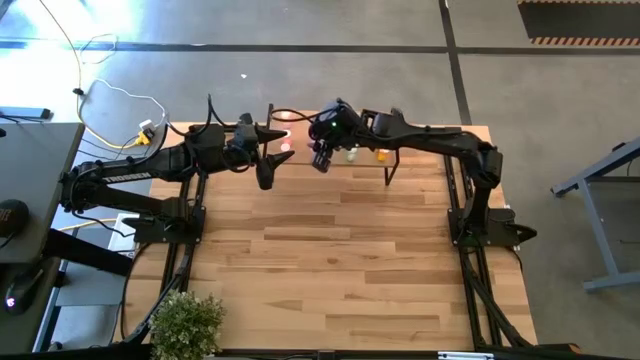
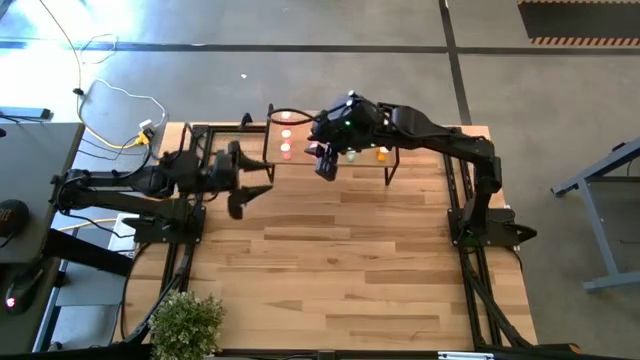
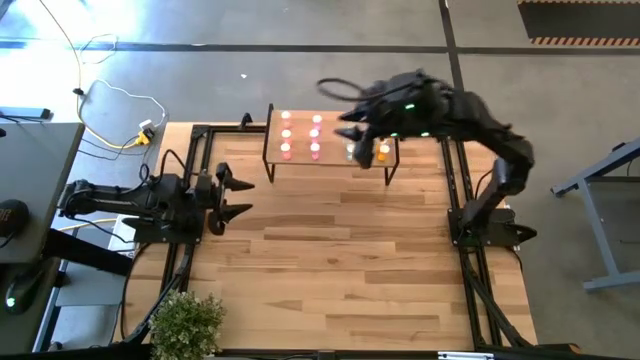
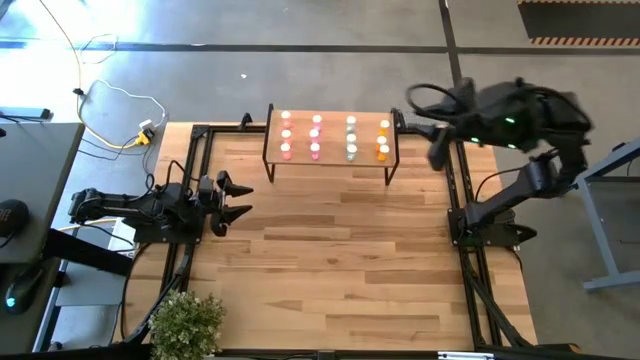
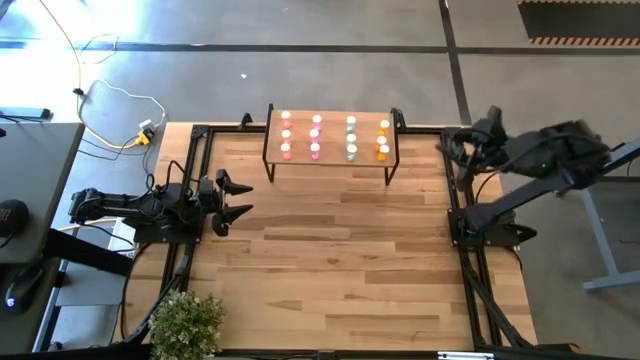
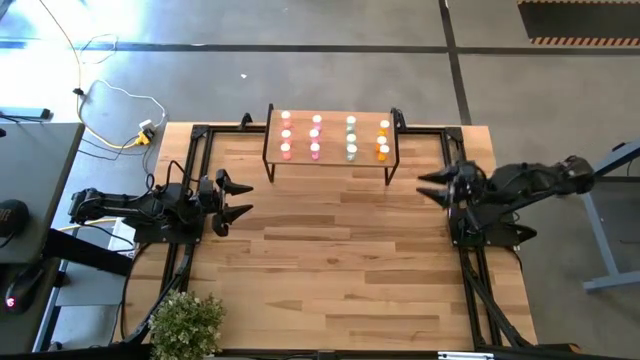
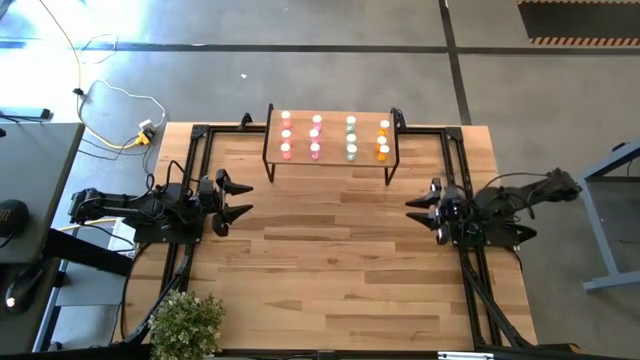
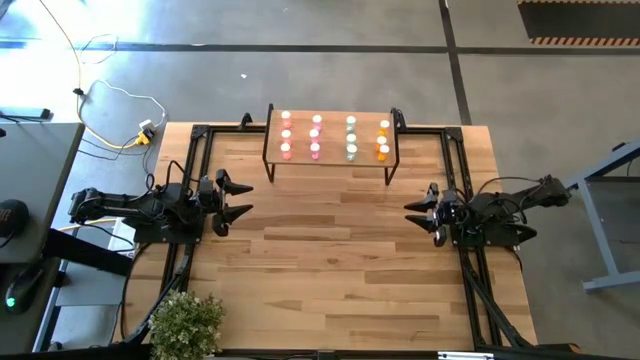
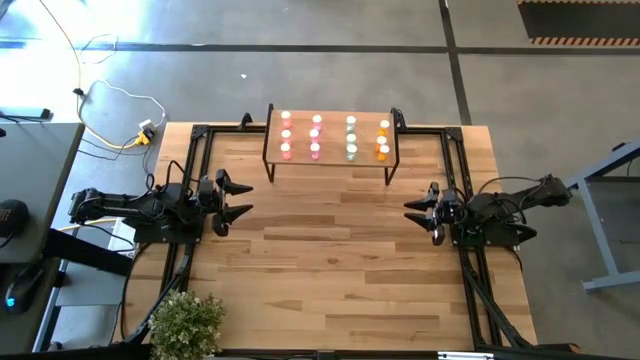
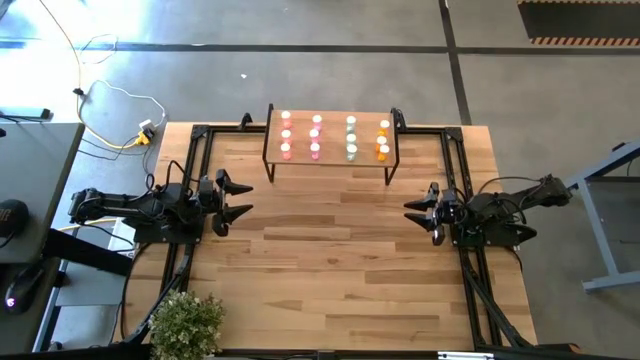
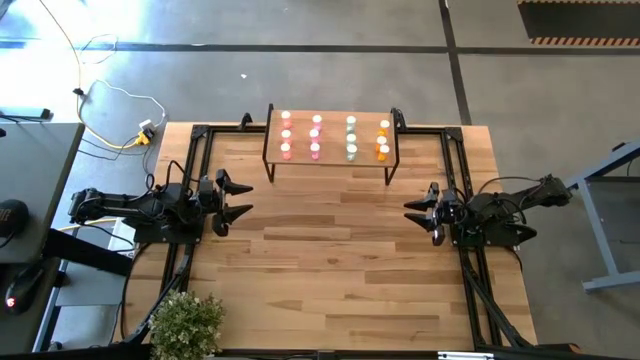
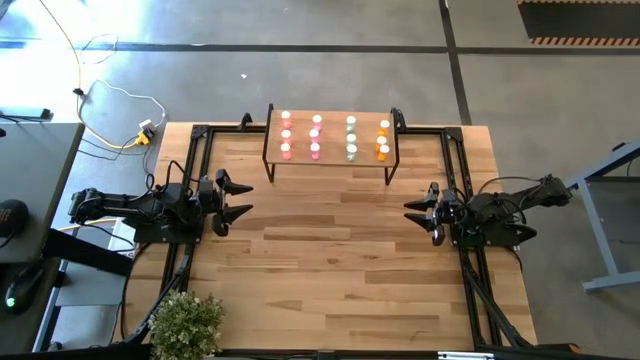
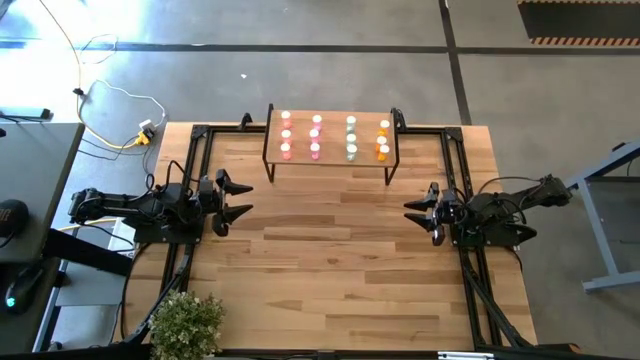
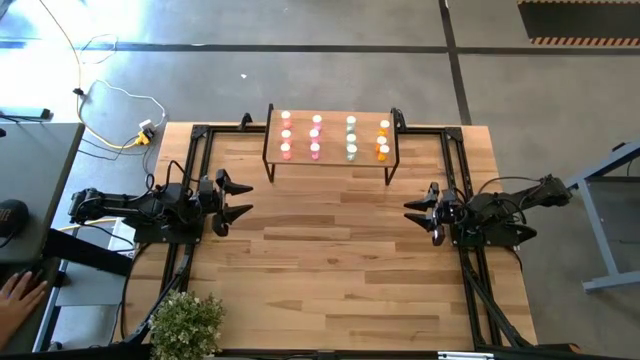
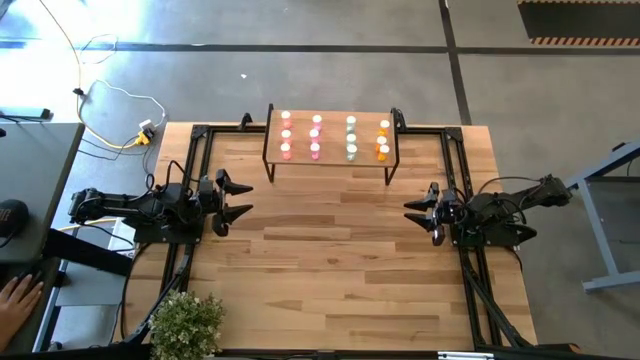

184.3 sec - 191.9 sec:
Task: Pick and place medicine bottles onto shelf by color
Return to Home Position

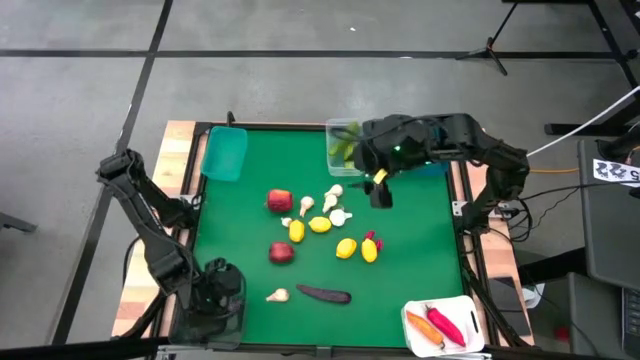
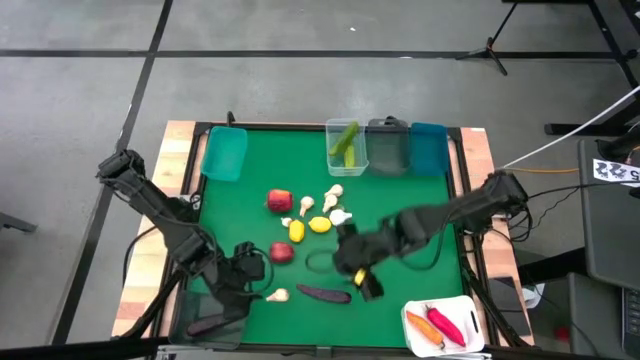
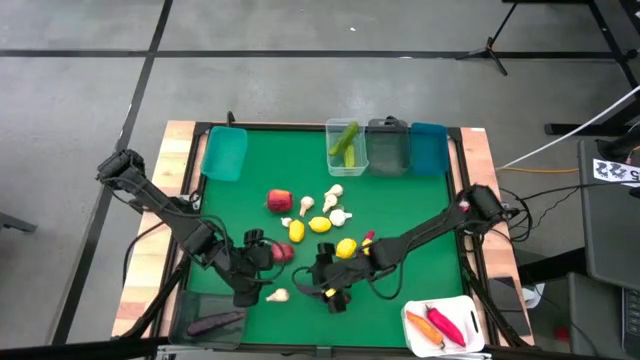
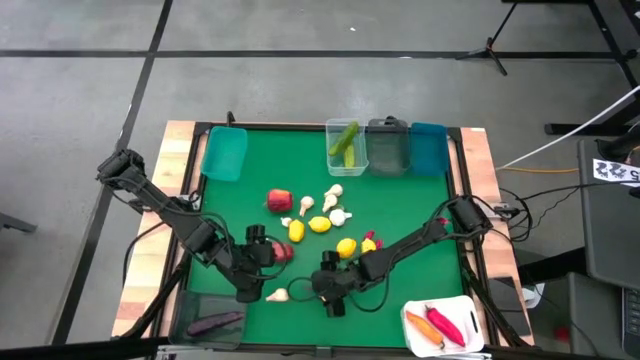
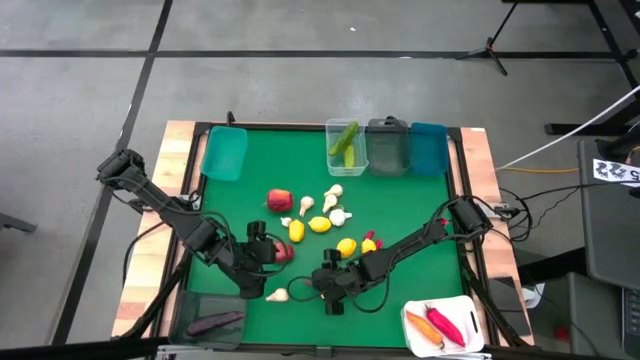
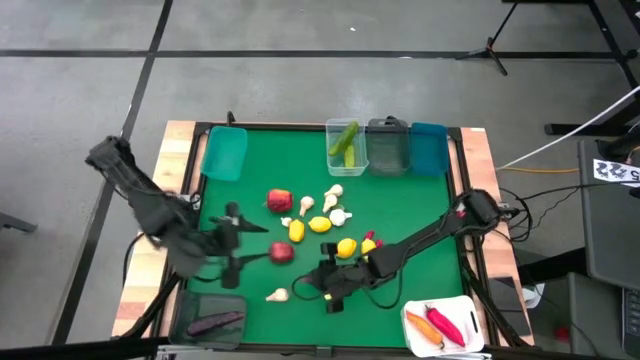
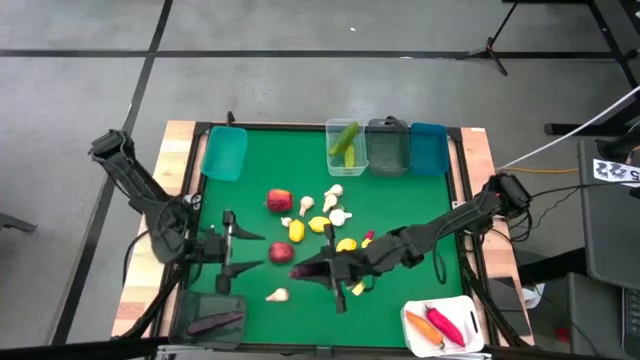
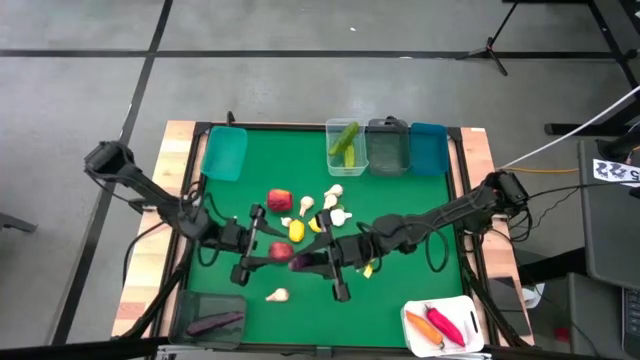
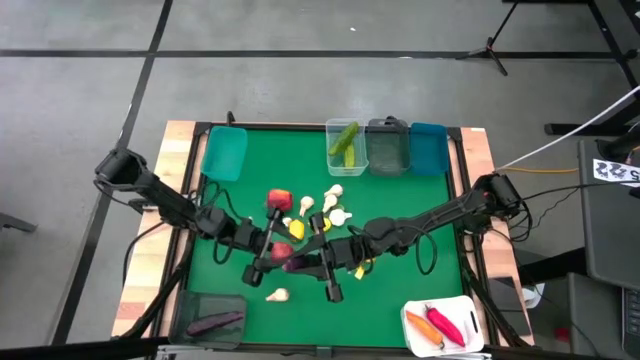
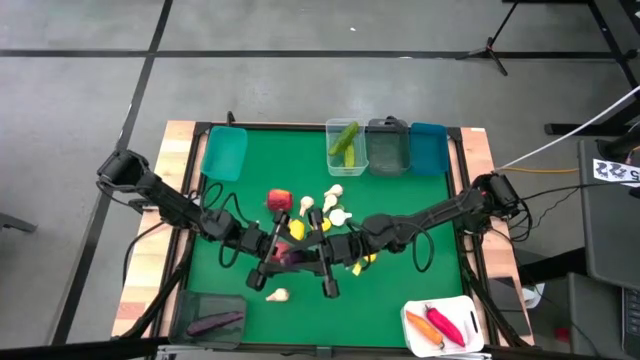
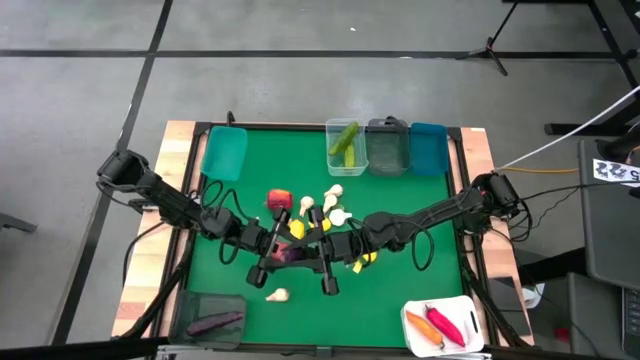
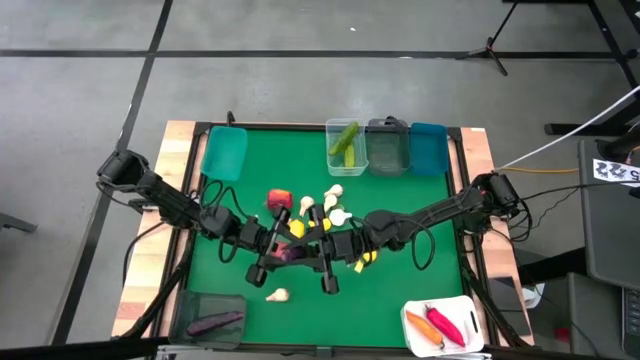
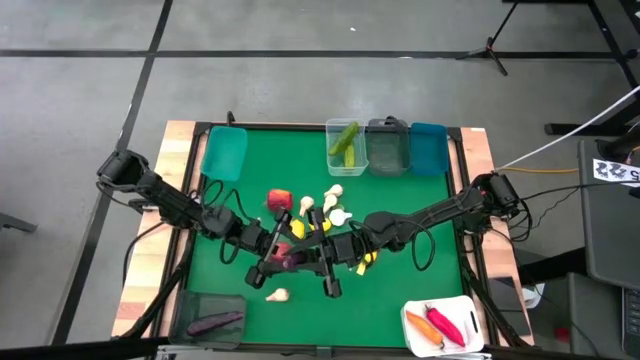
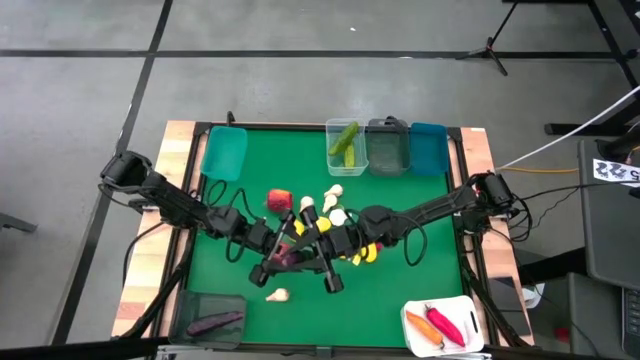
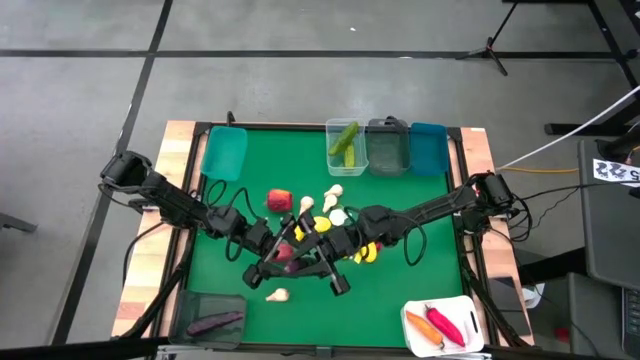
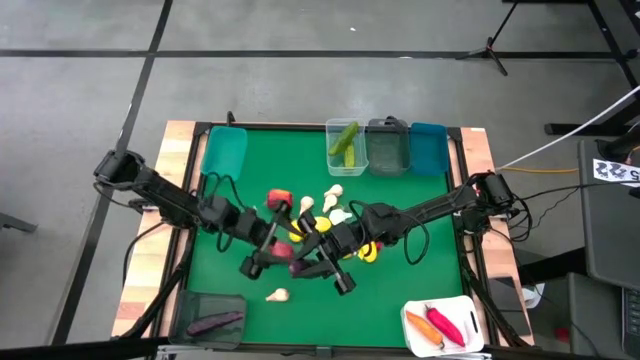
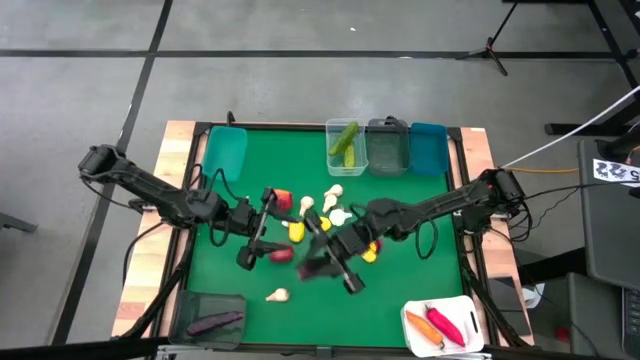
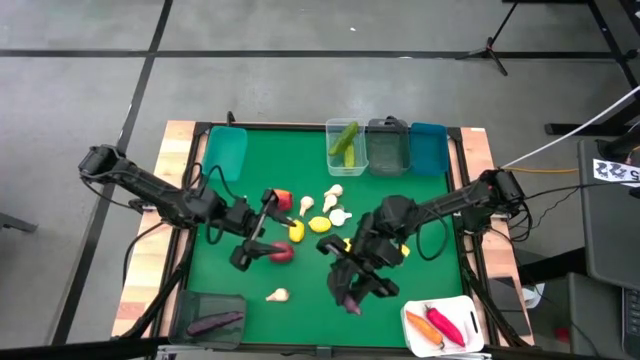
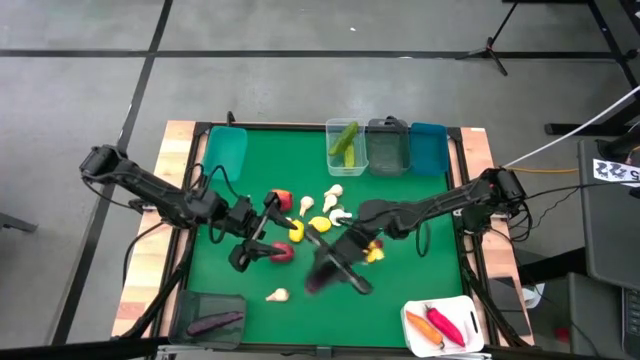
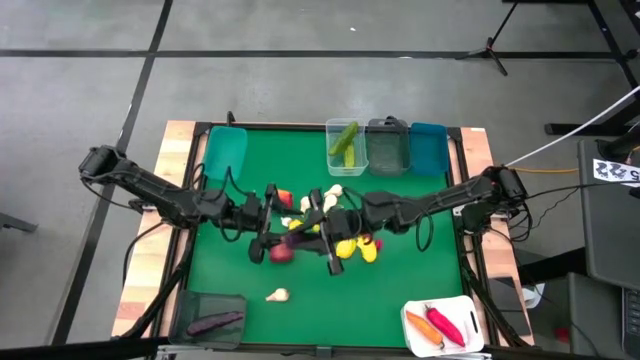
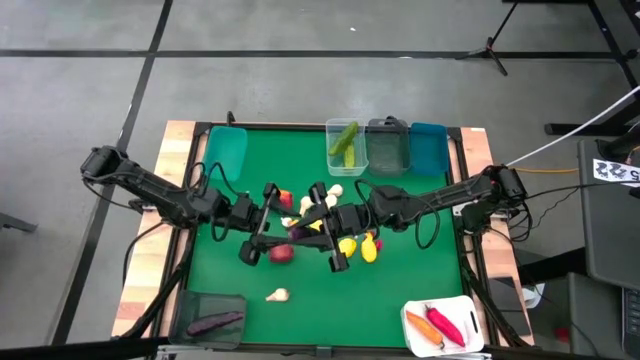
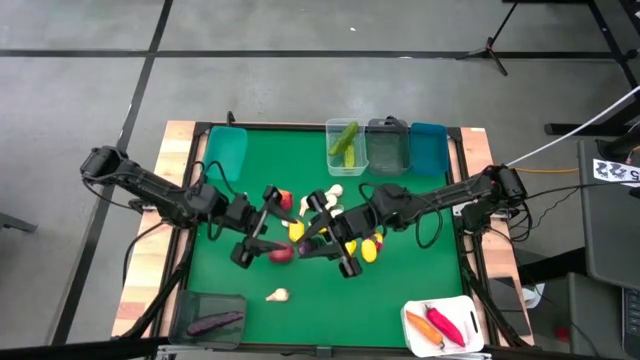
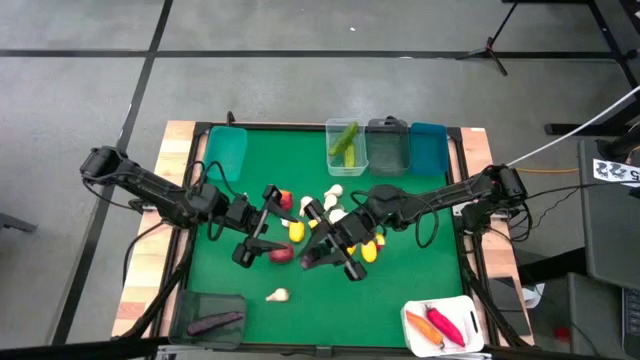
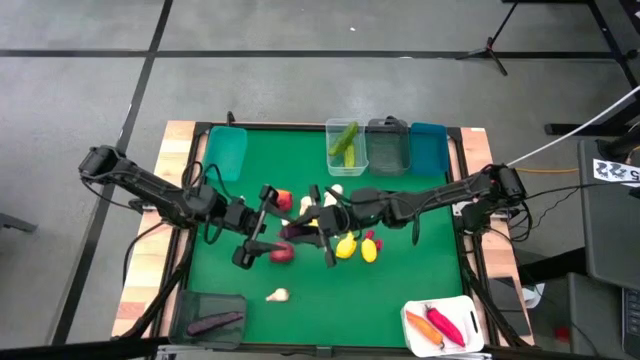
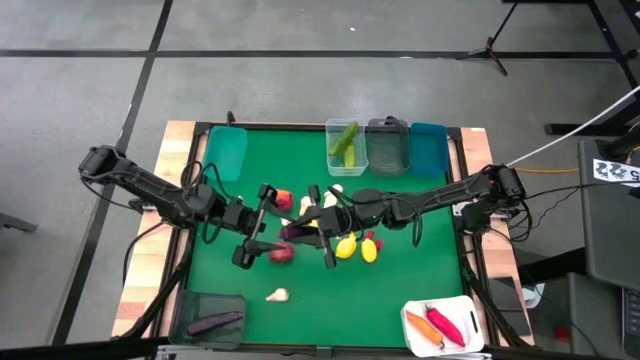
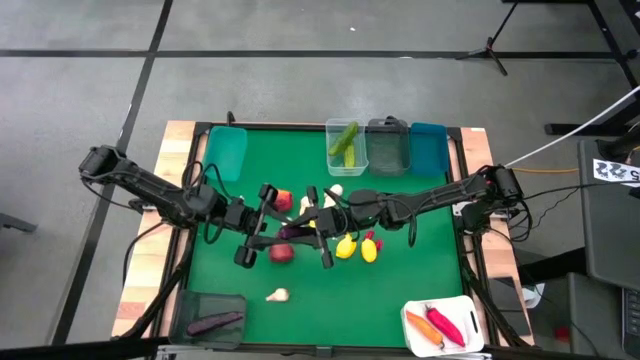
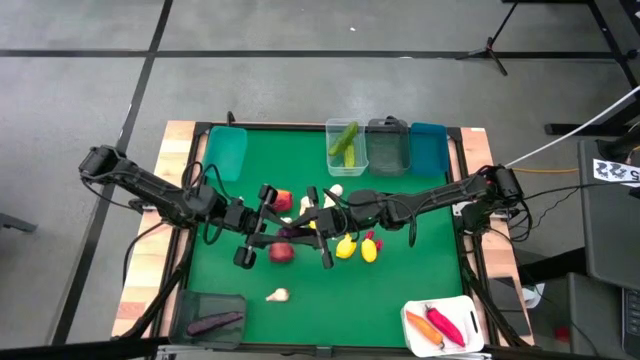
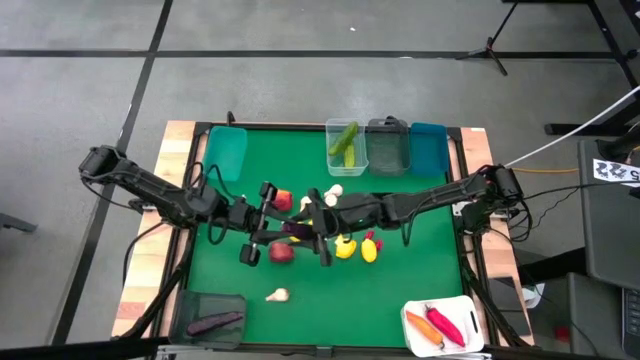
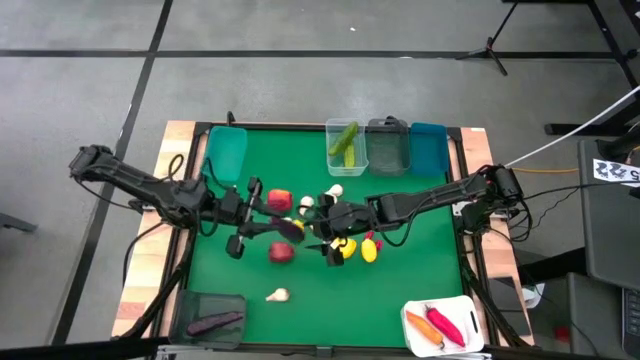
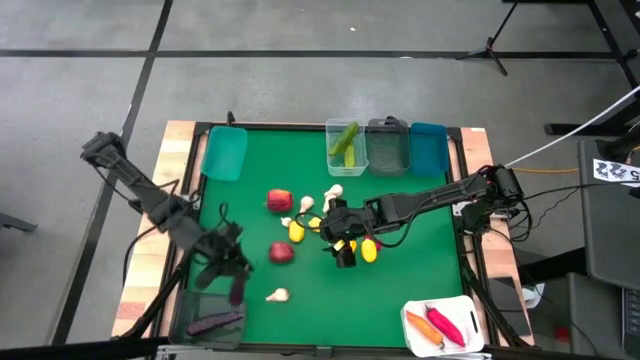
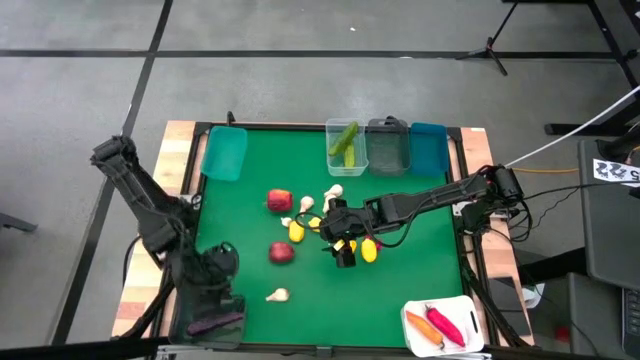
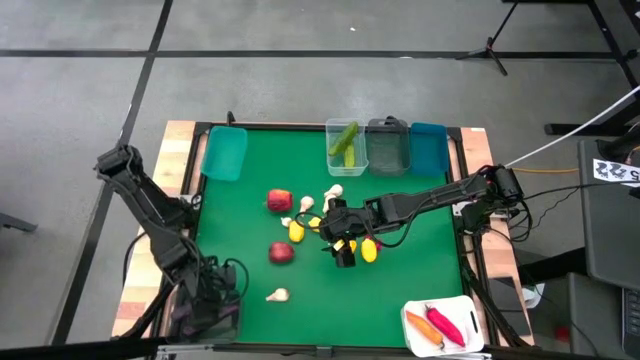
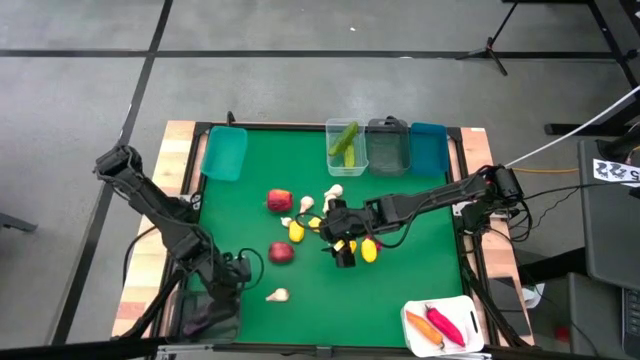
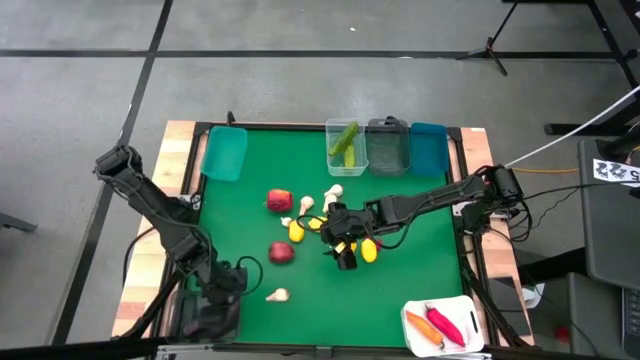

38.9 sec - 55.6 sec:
Task: Sort produce into baskets
Put the violet eggplant into the bottom black transparent bin
